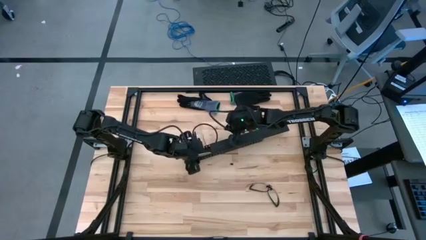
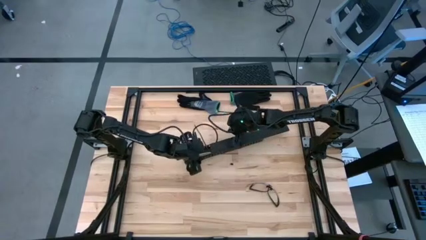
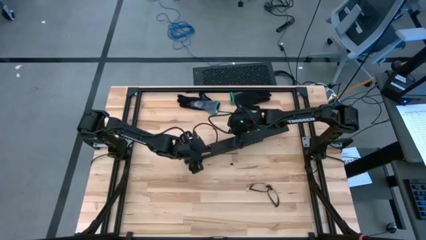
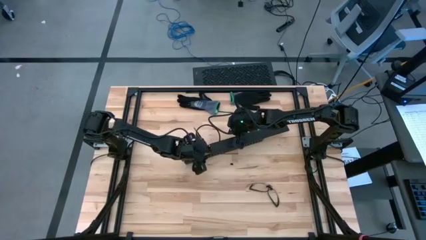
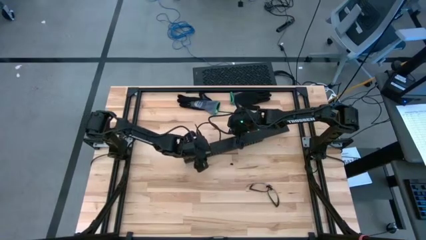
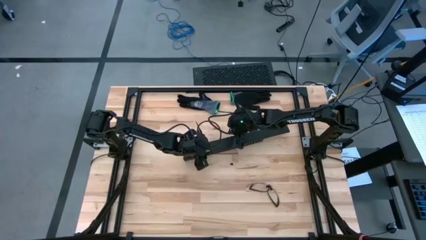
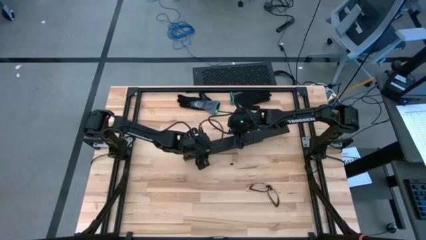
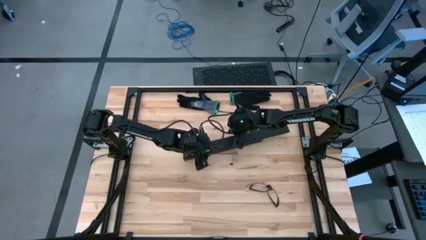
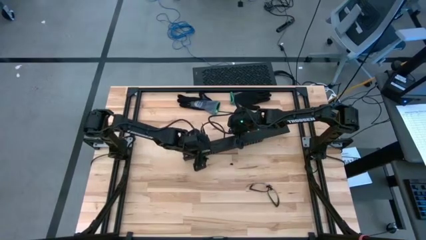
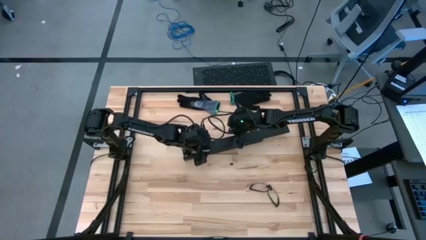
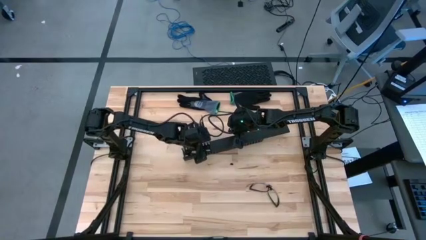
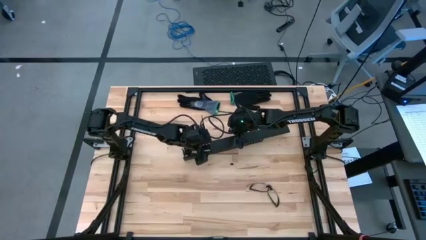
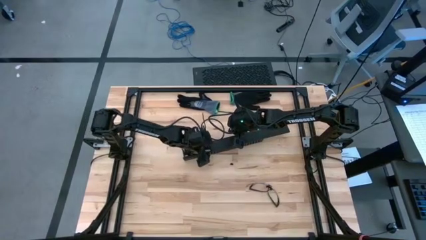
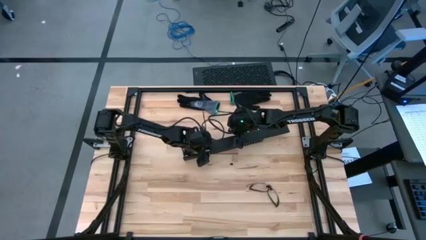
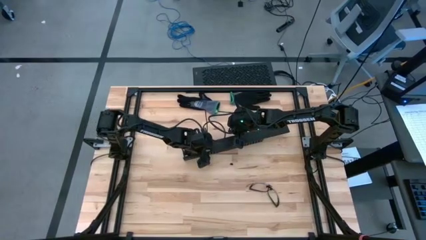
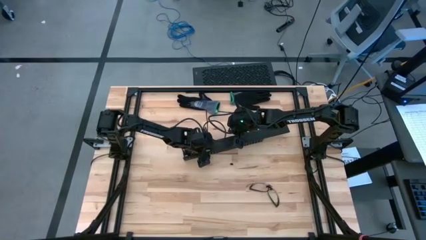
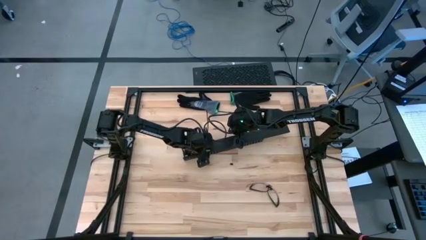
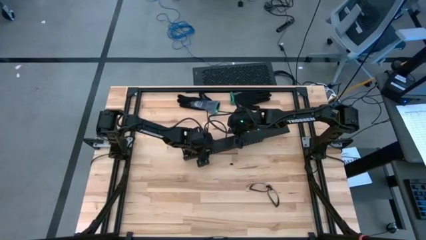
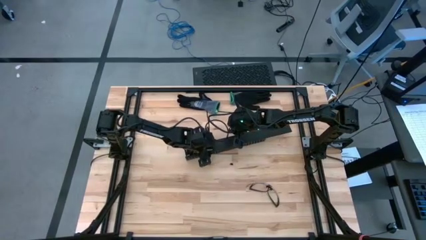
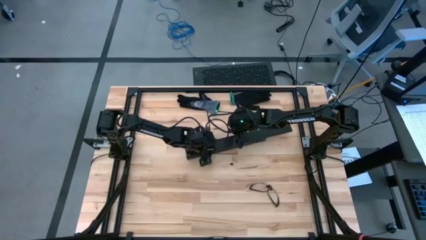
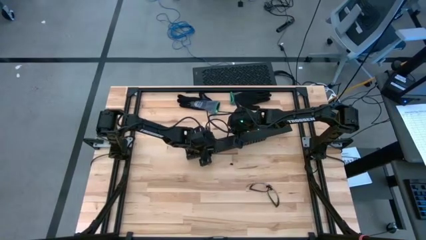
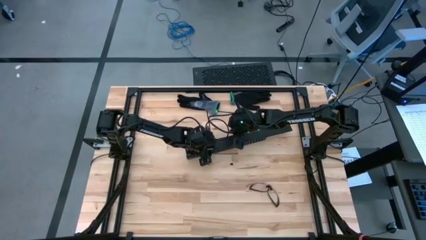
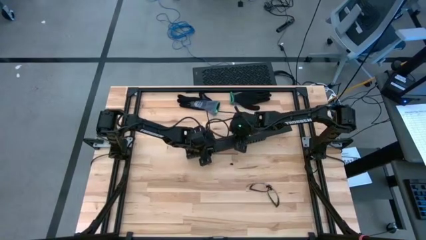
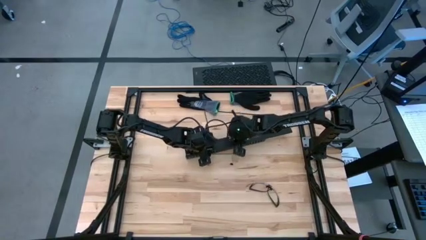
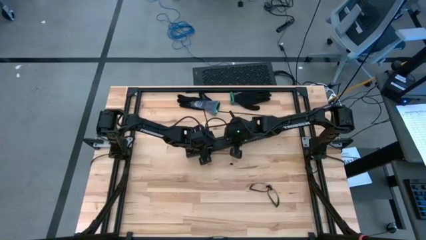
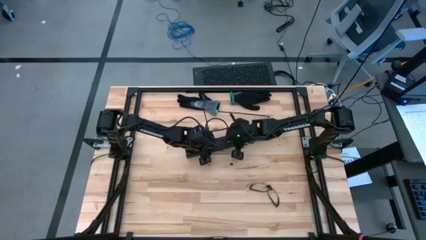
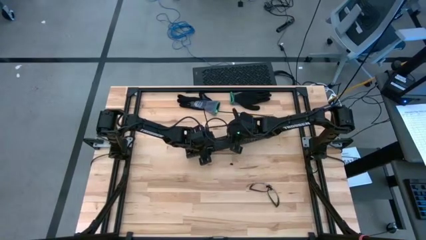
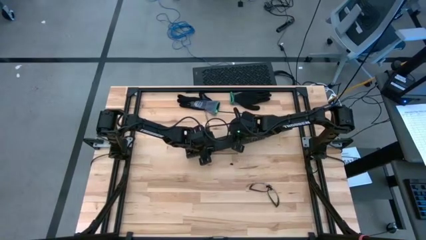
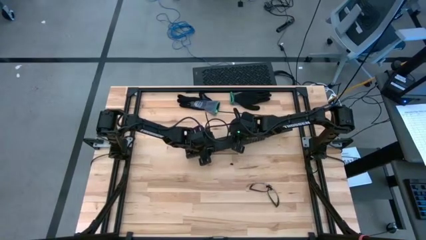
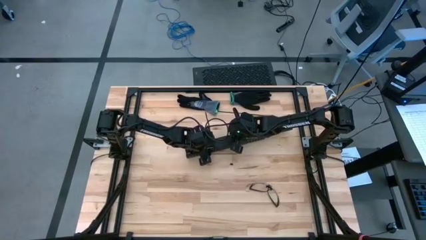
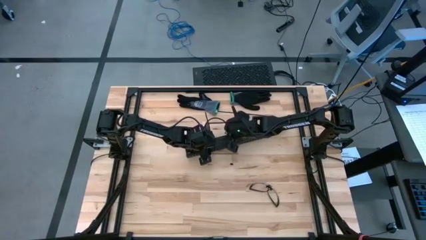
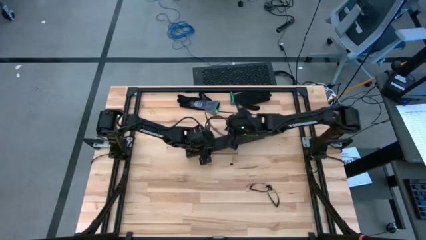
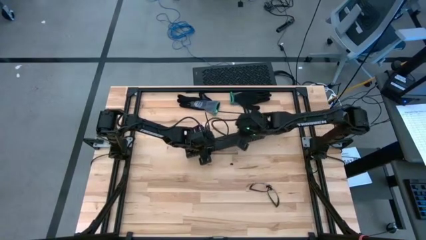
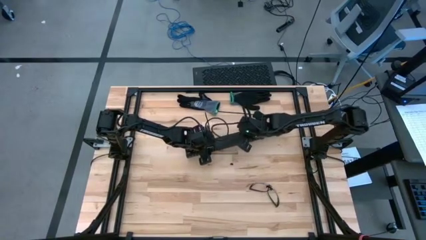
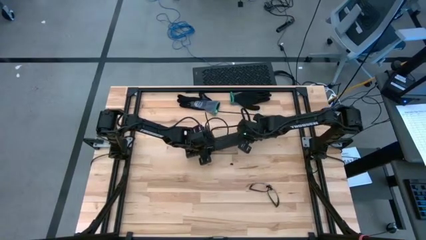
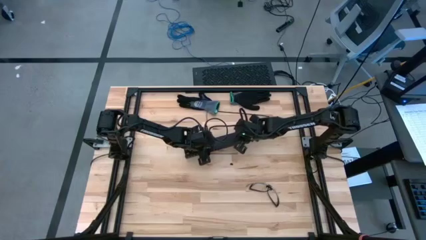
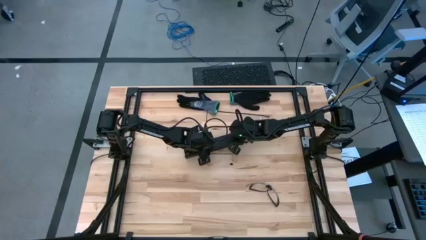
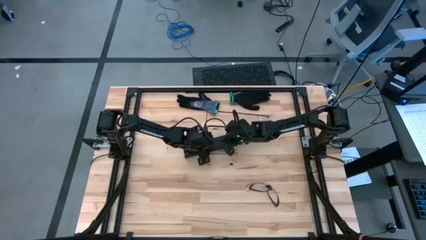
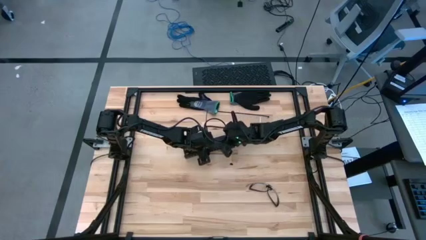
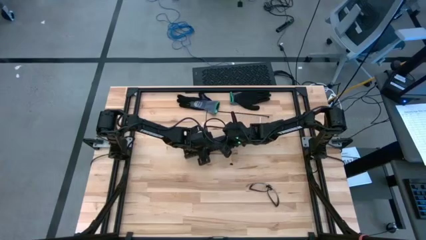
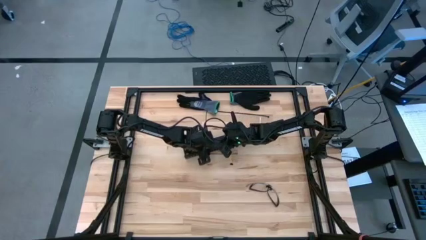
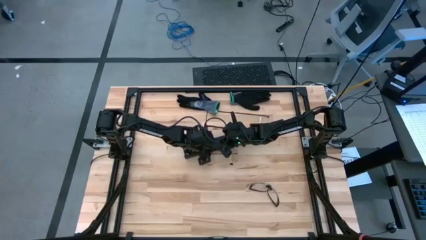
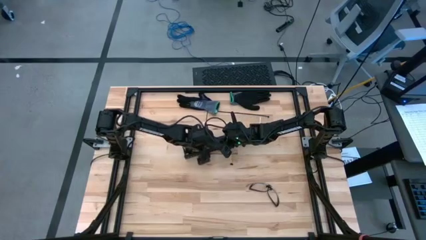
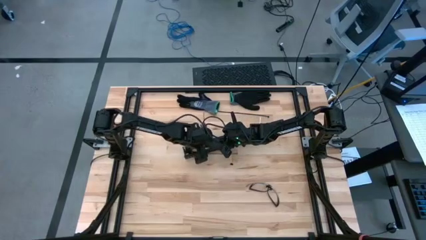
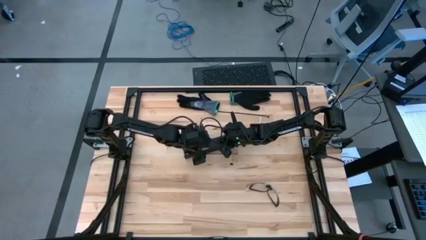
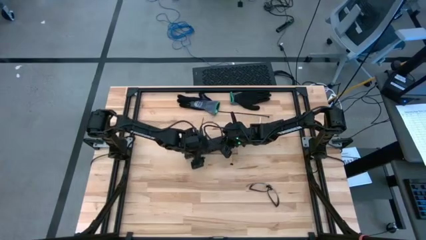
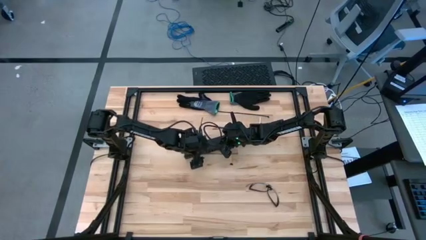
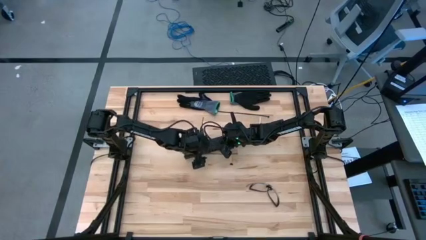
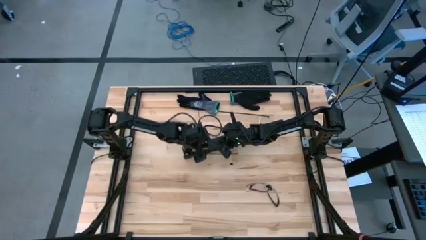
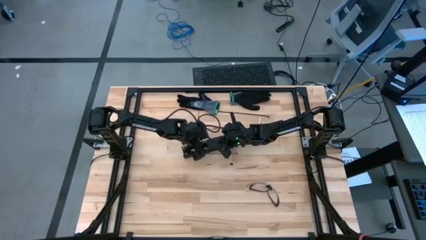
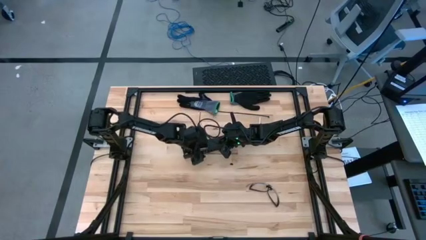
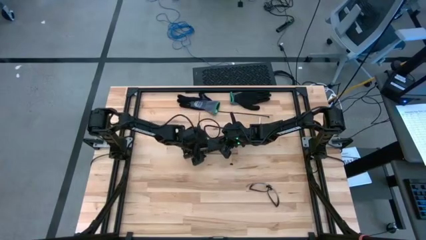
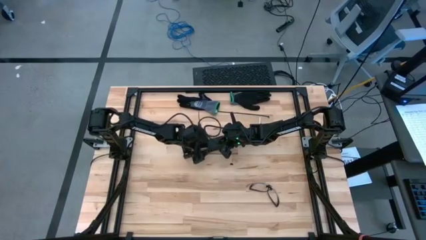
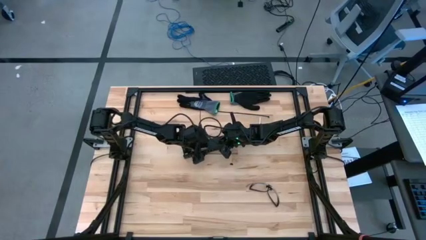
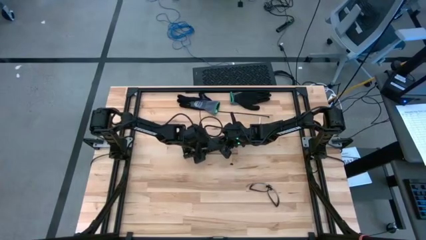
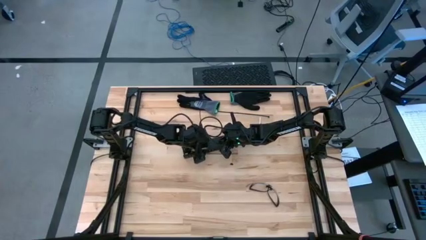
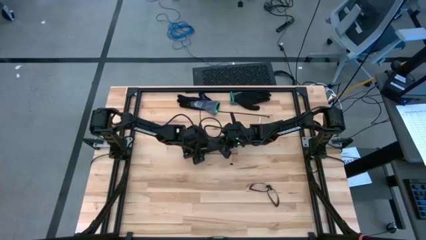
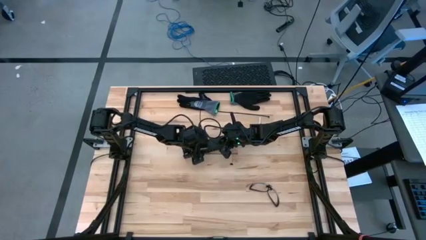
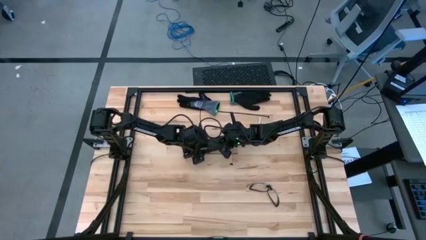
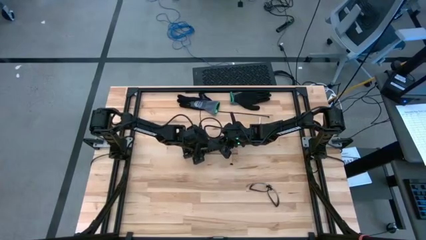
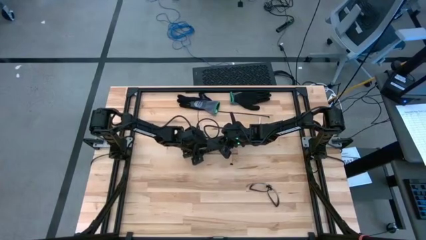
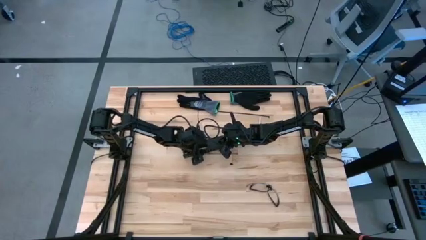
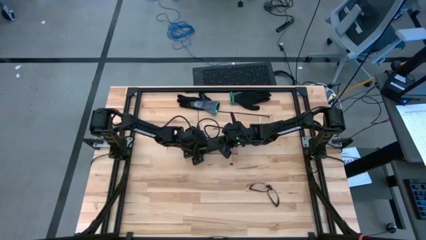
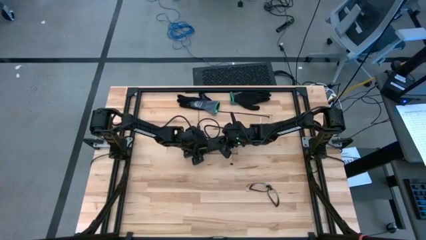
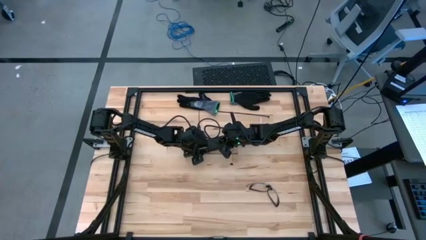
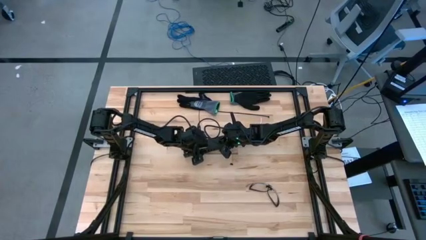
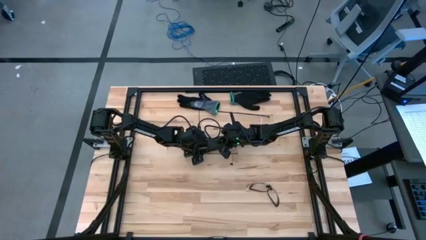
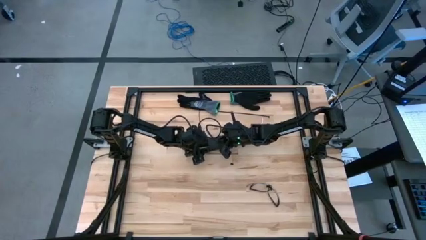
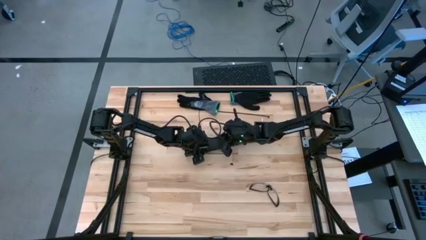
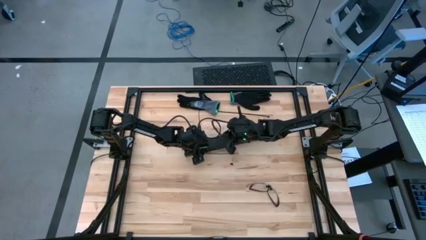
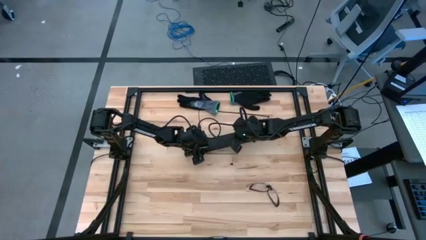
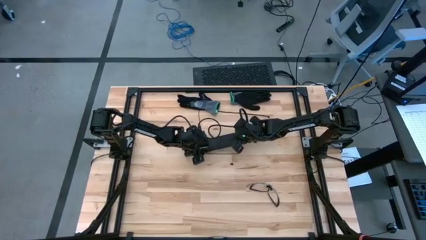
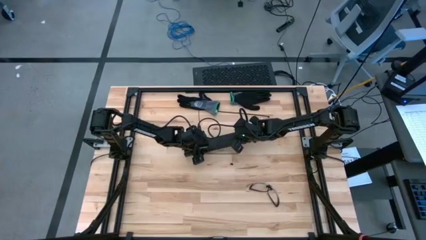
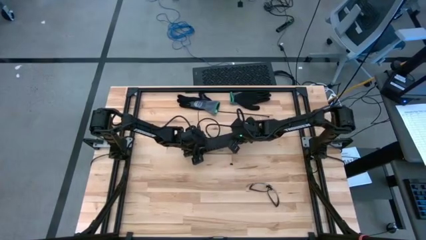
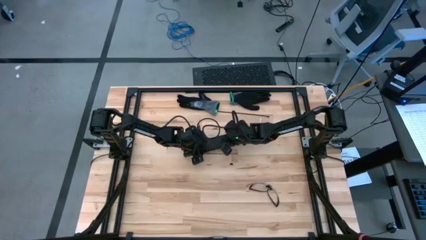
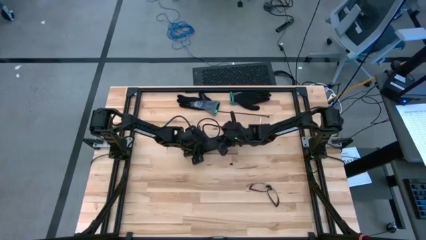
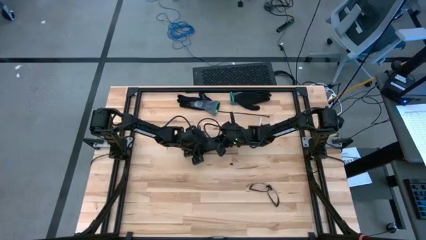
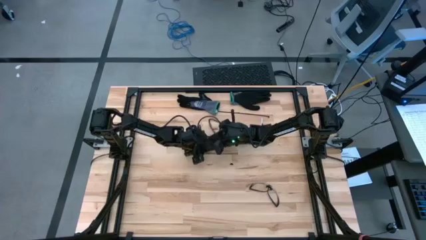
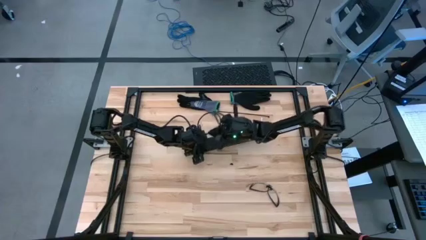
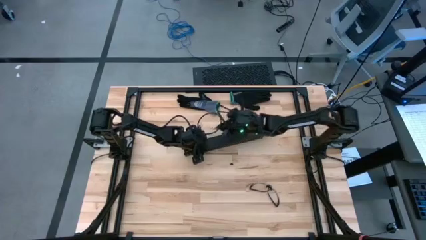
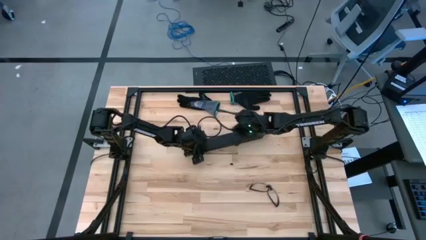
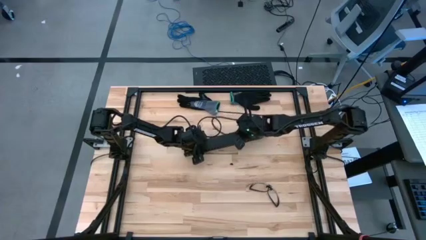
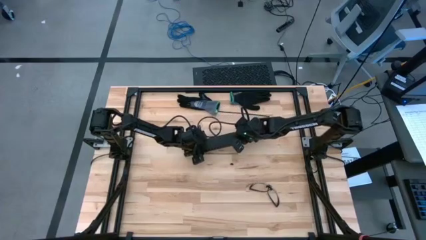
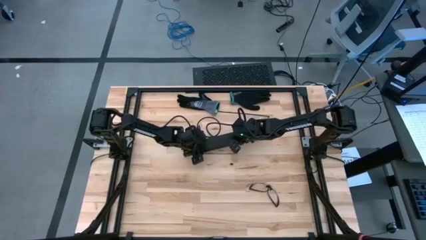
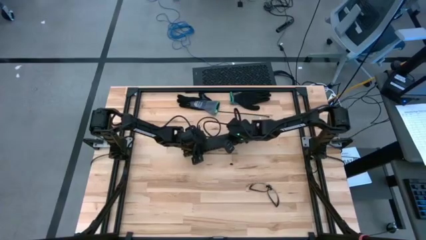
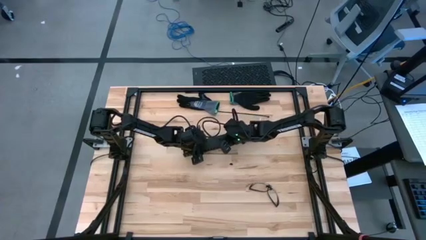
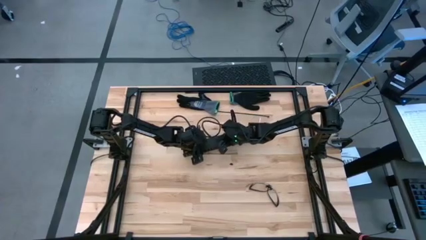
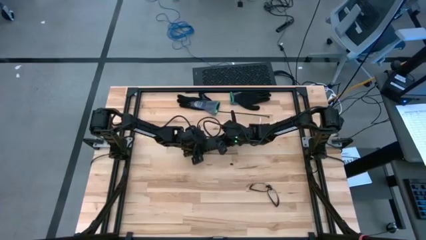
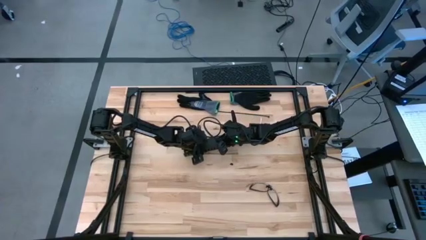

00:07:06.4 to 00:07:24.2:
Task: Ziptie cables
Close the black cable duct
